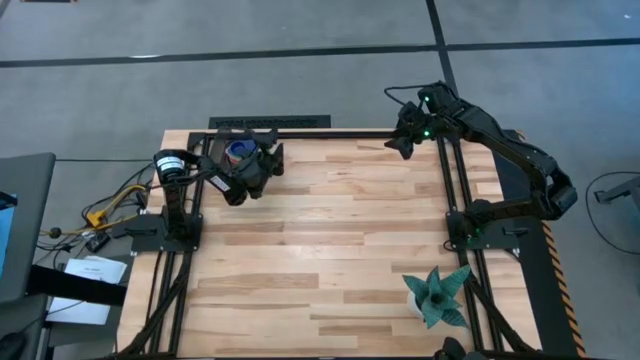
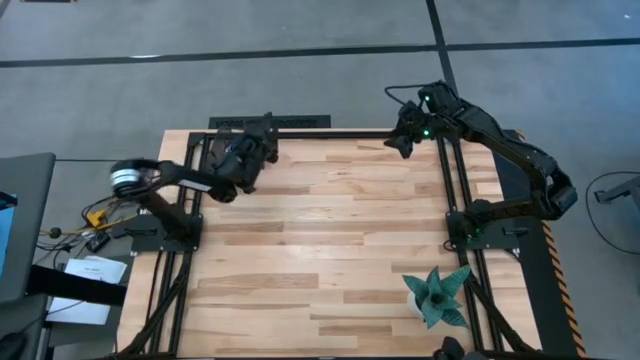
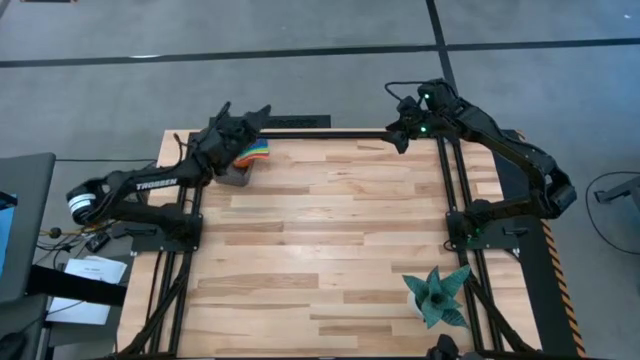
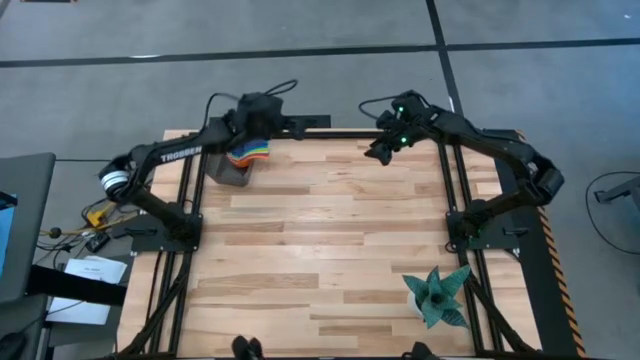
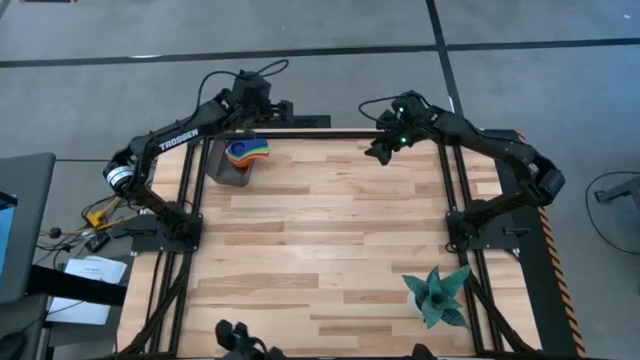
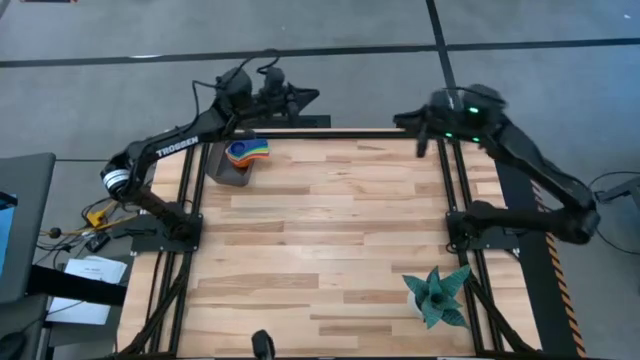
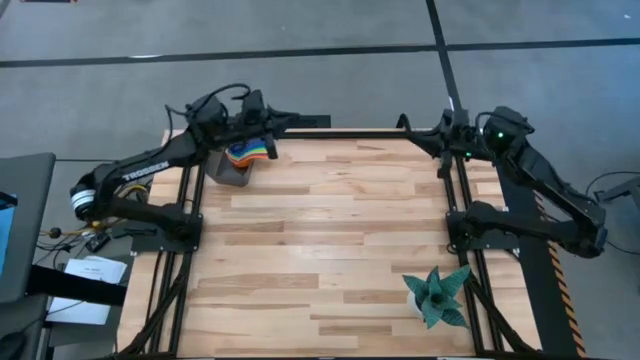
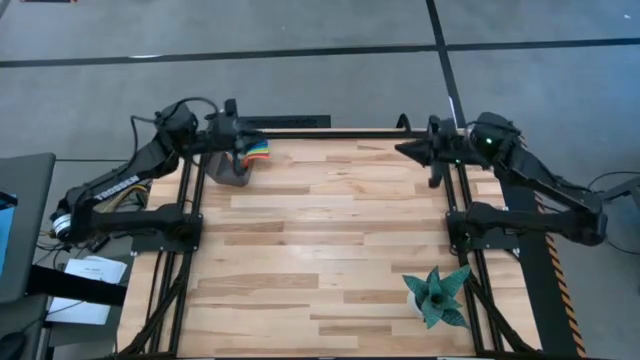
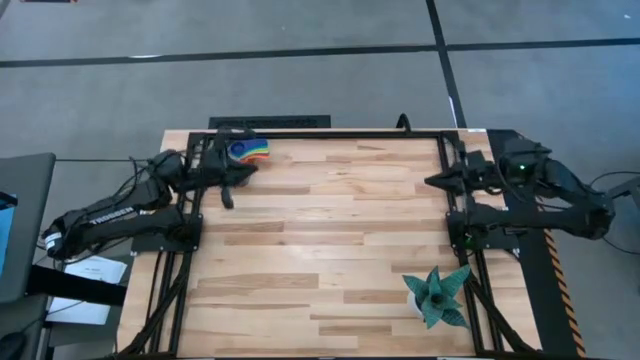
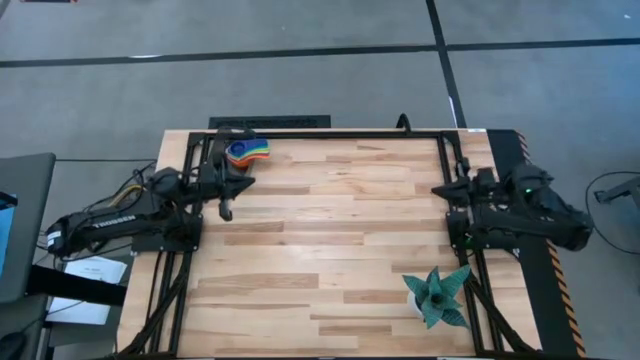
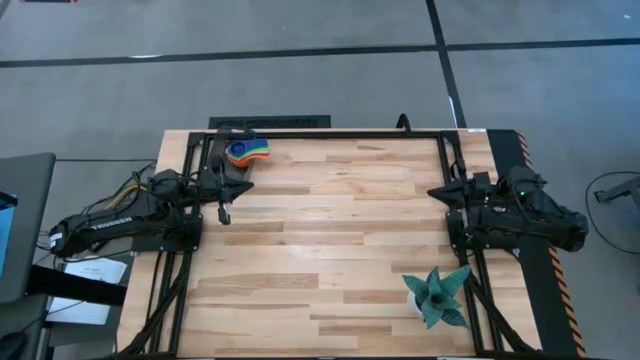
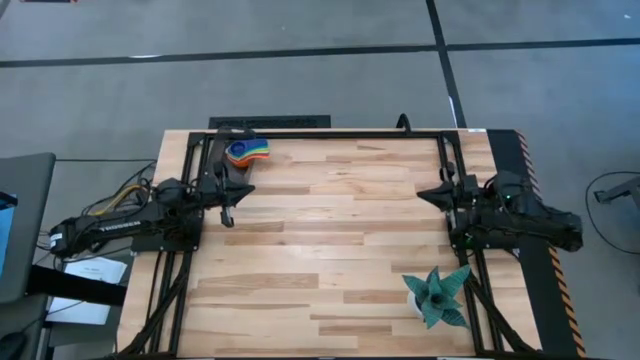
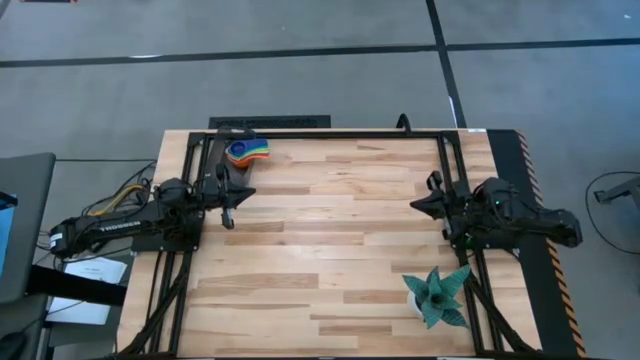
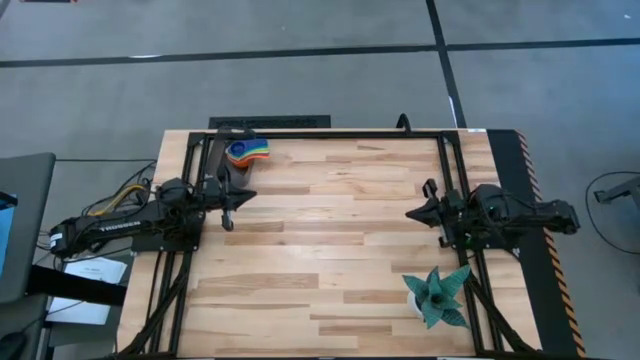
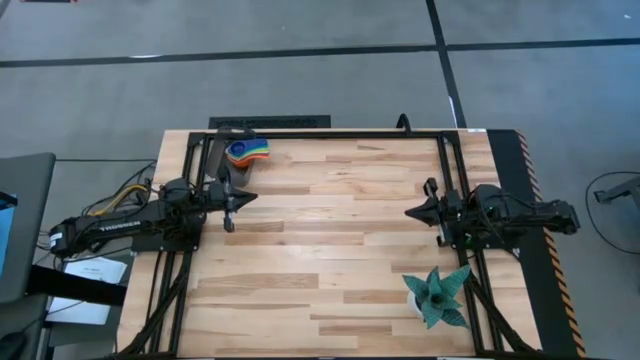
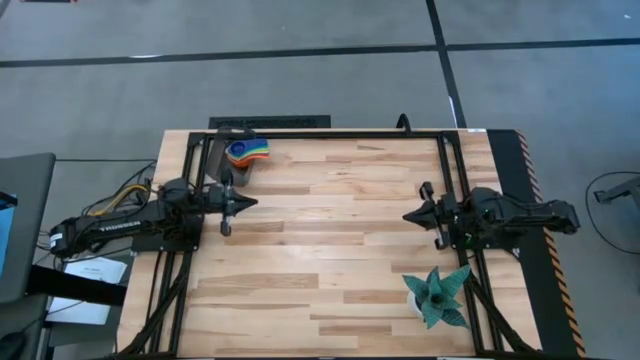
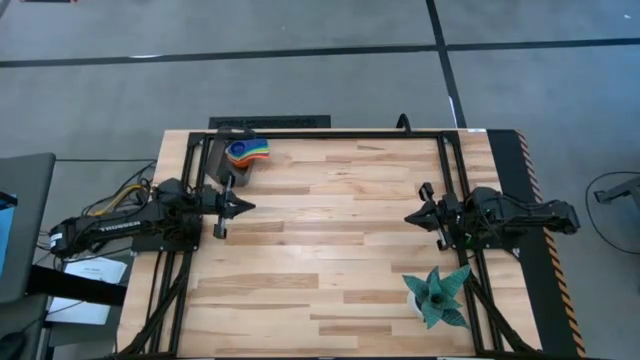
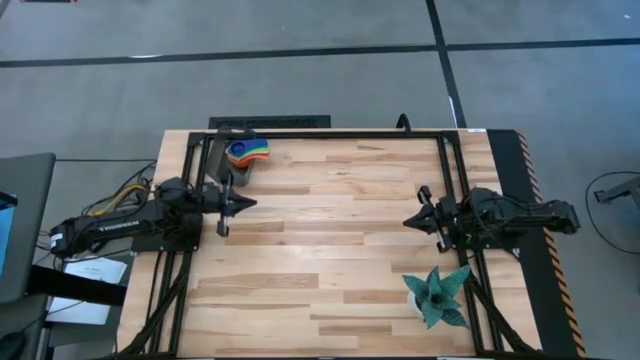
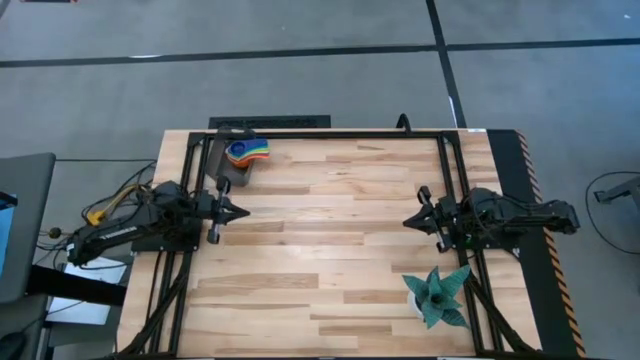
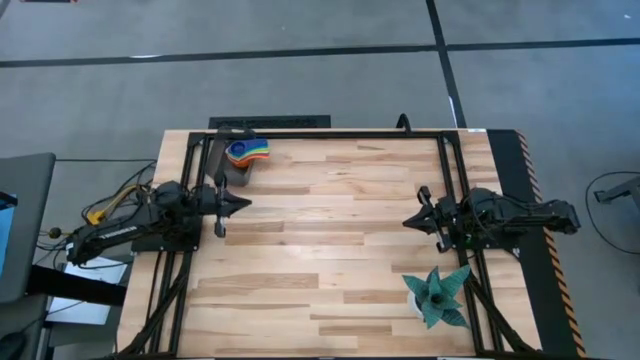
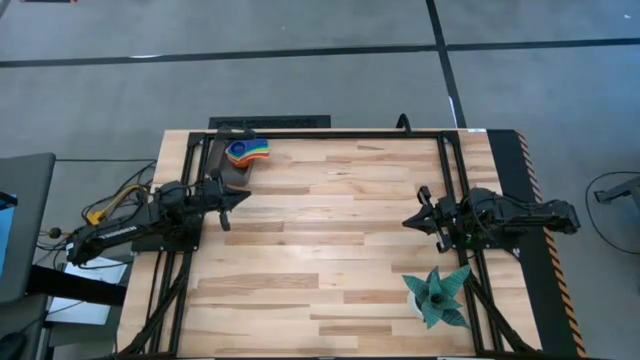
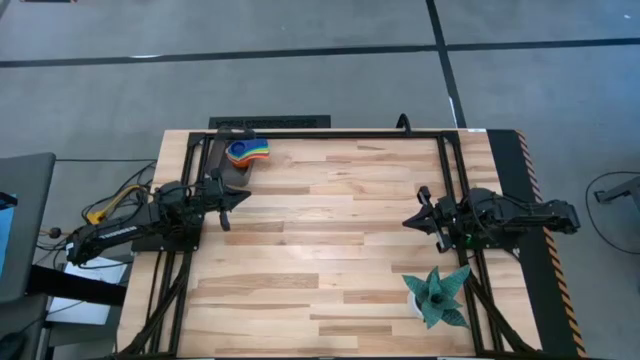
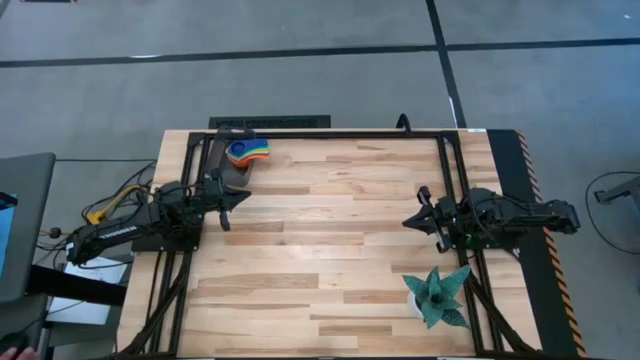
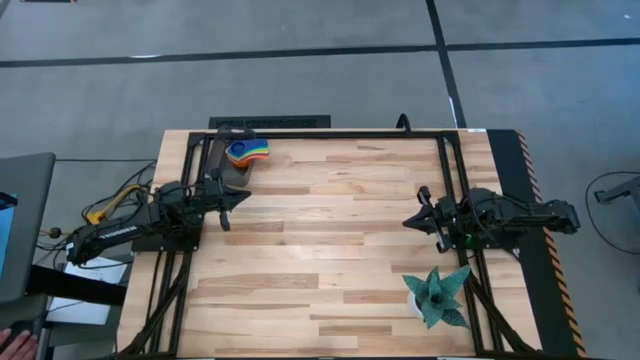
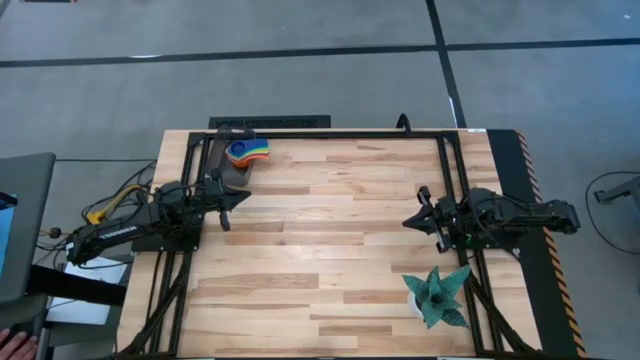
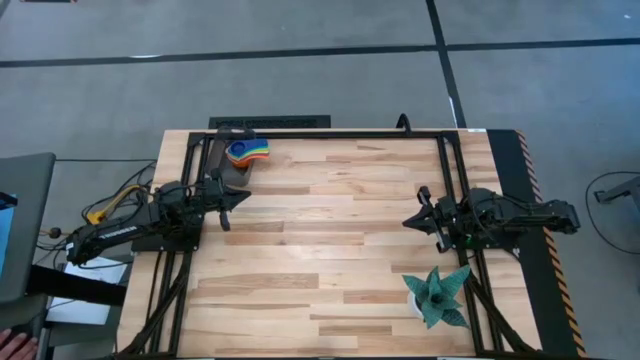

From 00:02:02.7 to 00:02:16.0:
Task: Nest measuring cups in basket
Return to Home Position

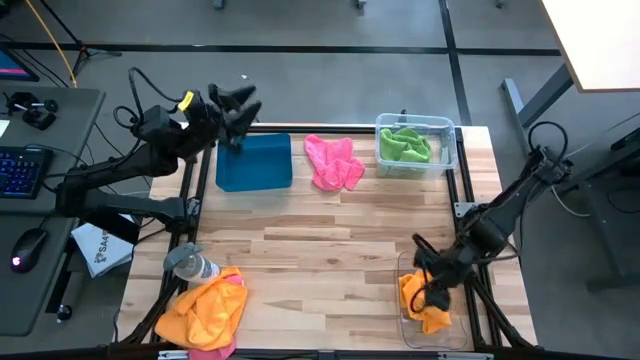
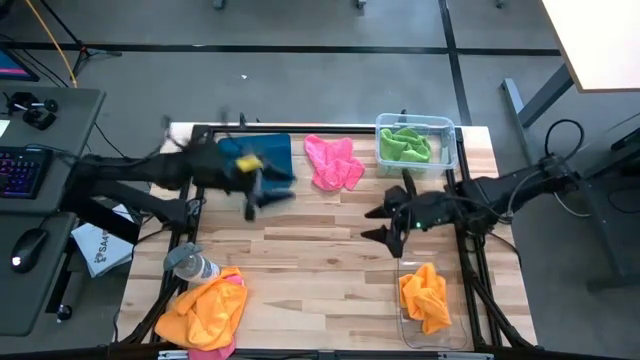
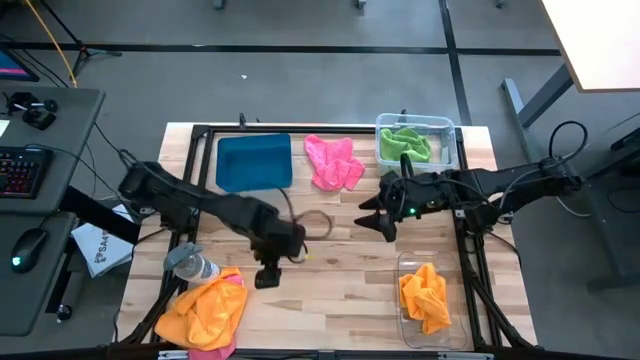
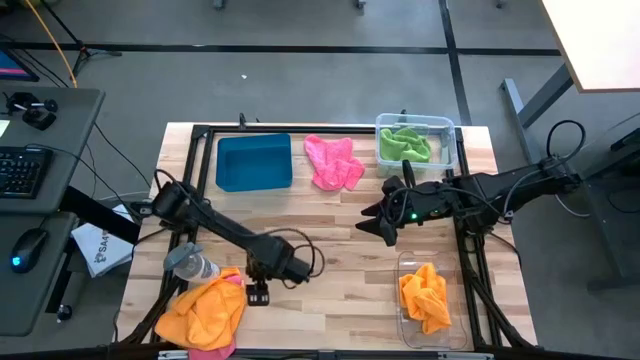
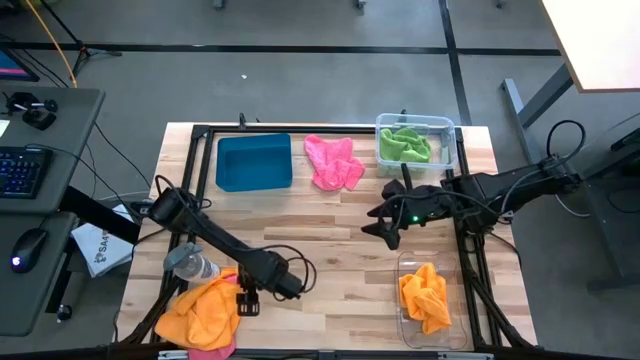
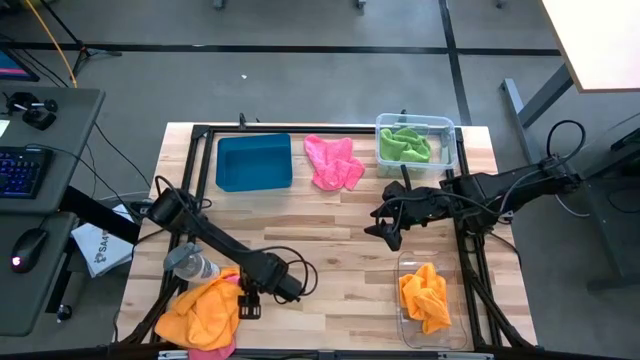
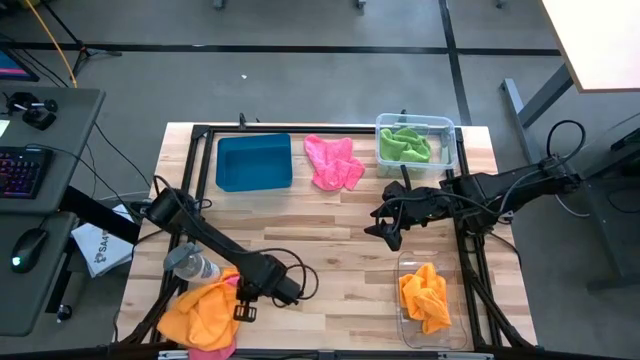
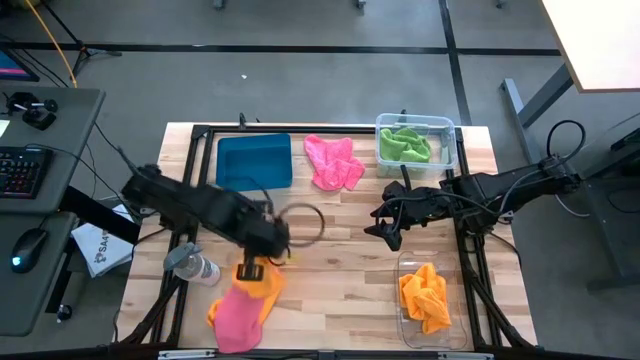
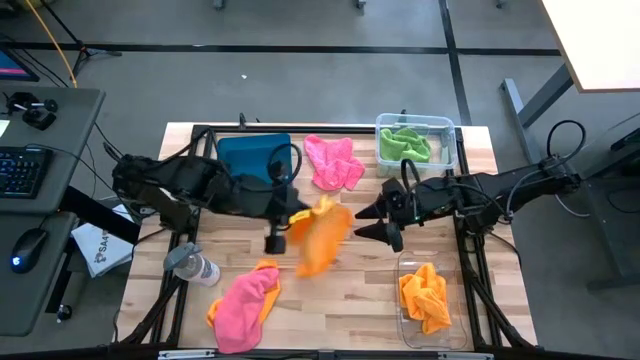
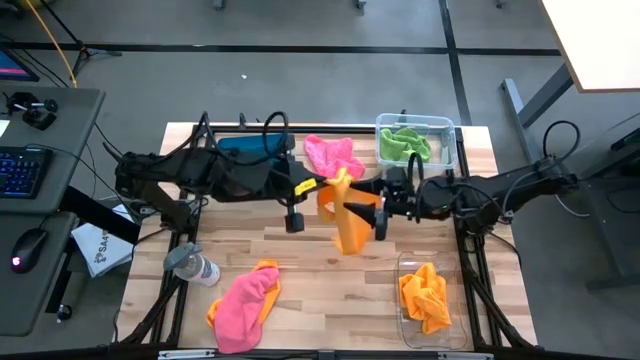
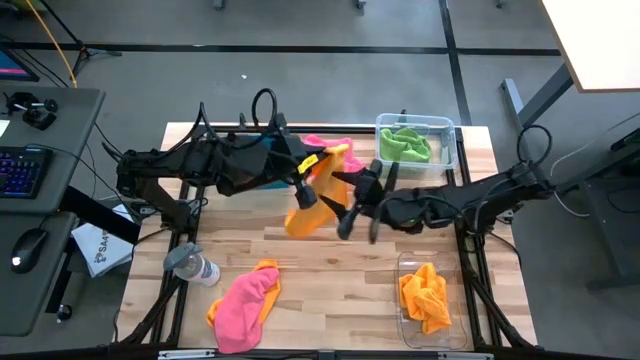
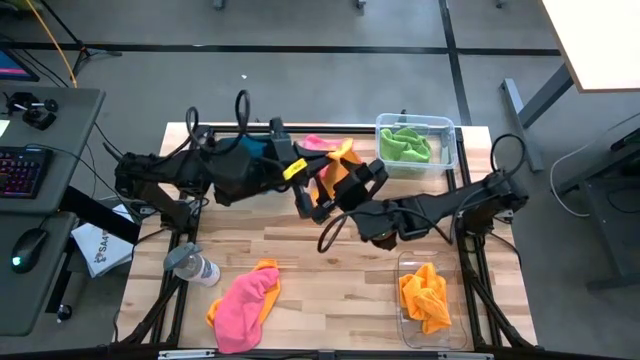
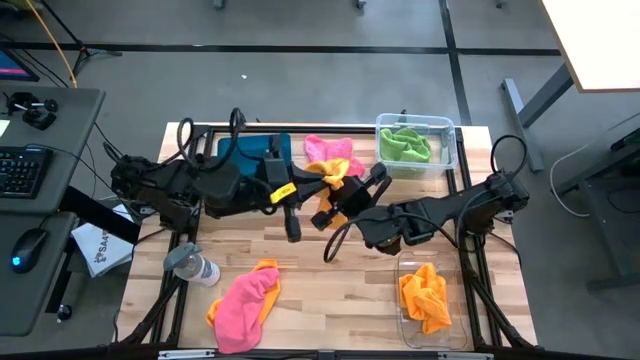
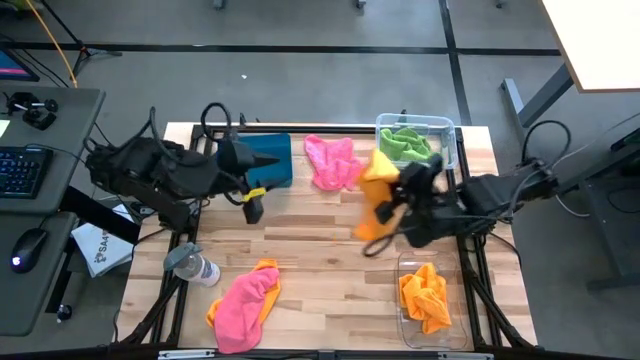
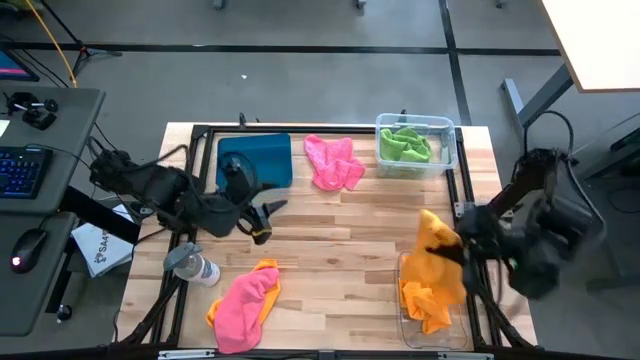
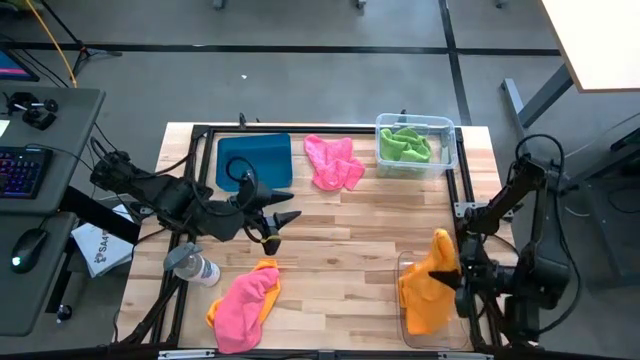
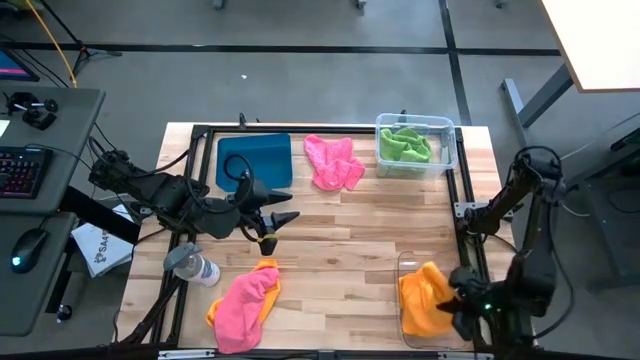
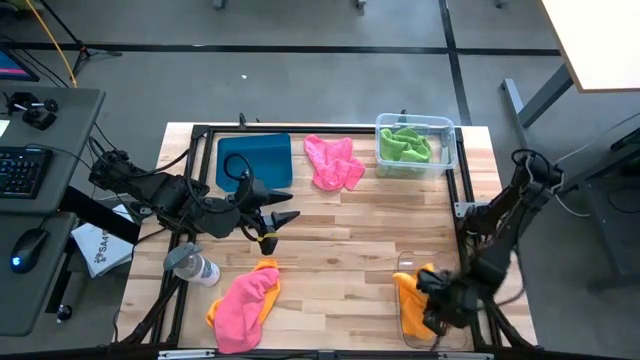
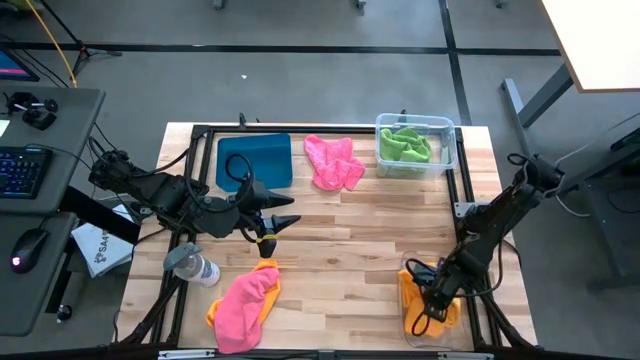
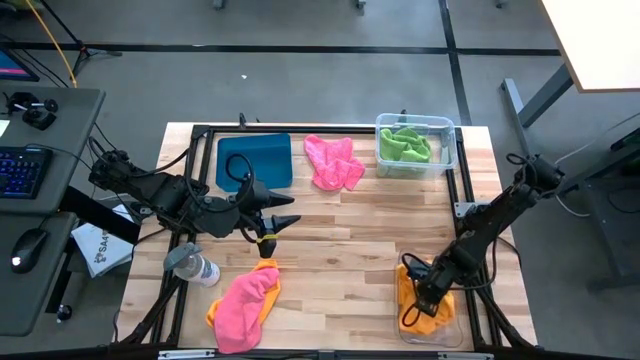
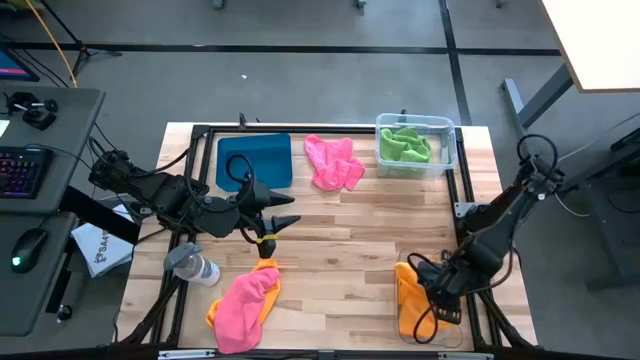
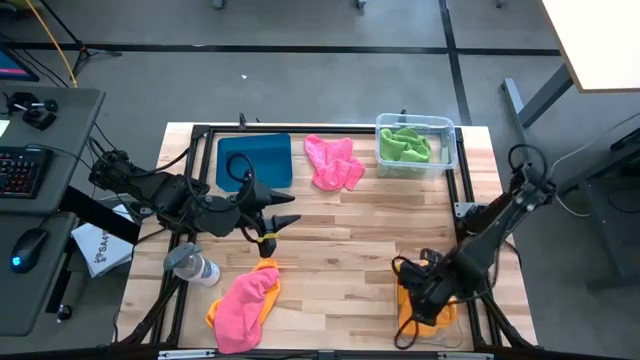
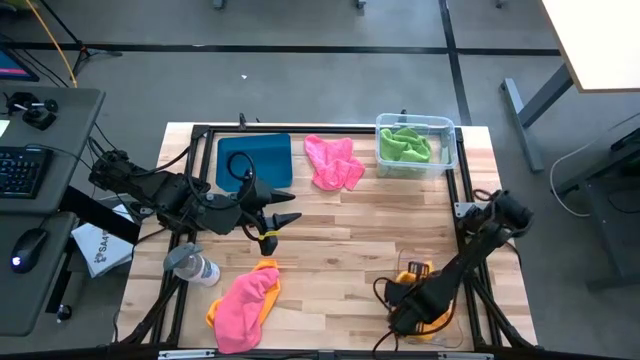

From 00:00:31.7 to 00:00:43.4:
Task: Sort microfiber towel by color & place in baskets
Put the top orange towel into the bottom transparent bin
